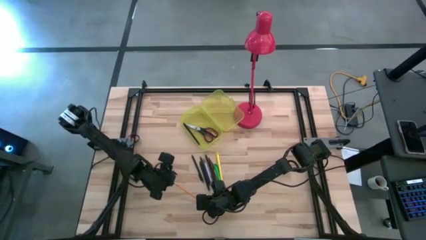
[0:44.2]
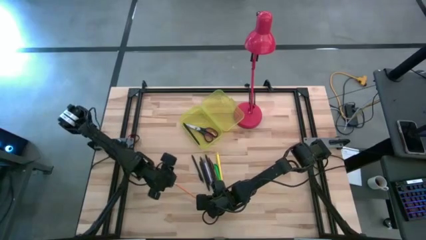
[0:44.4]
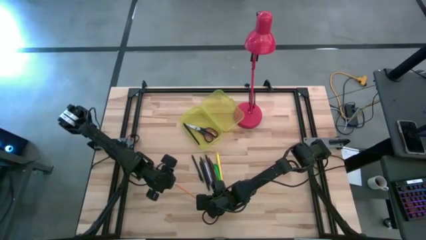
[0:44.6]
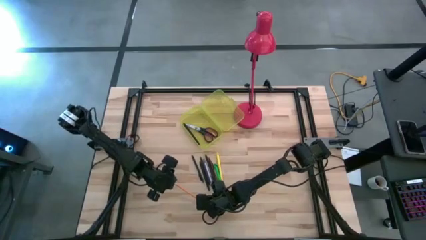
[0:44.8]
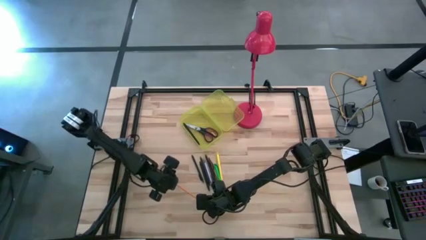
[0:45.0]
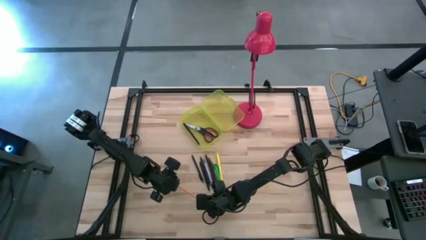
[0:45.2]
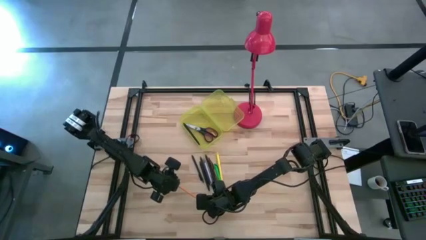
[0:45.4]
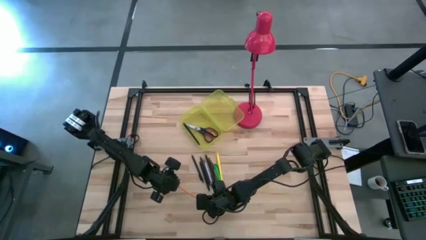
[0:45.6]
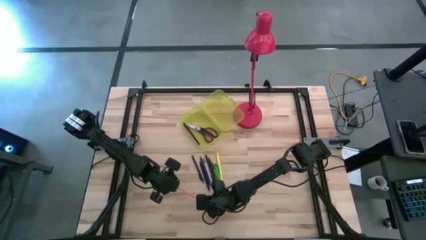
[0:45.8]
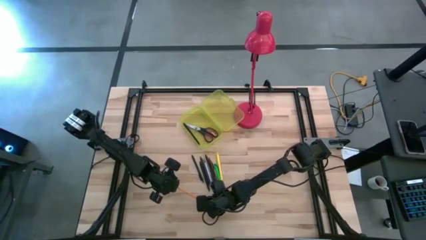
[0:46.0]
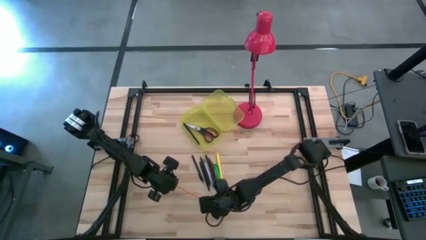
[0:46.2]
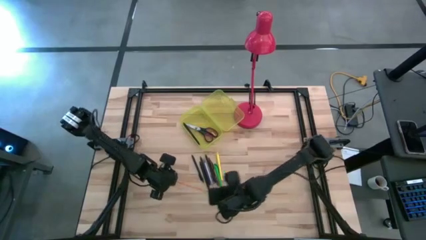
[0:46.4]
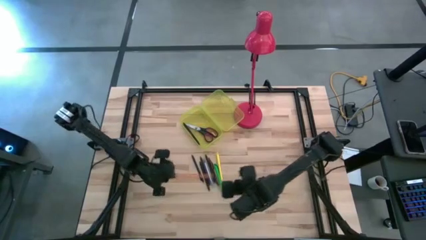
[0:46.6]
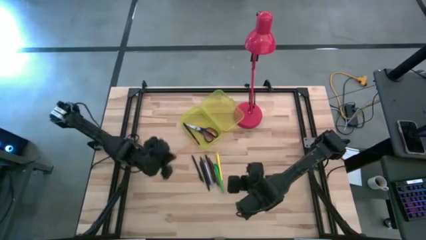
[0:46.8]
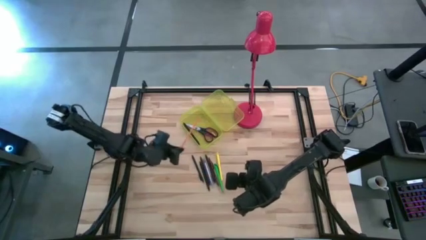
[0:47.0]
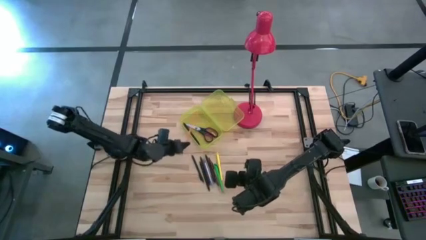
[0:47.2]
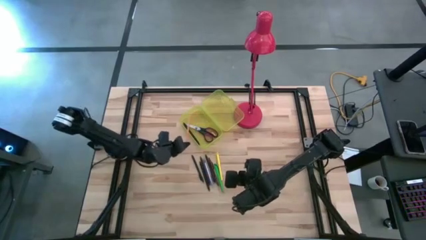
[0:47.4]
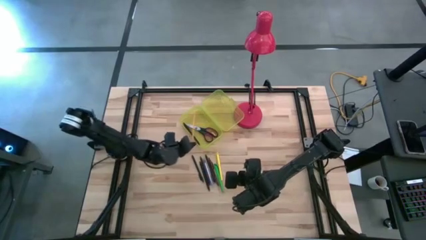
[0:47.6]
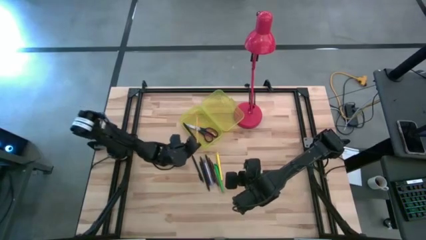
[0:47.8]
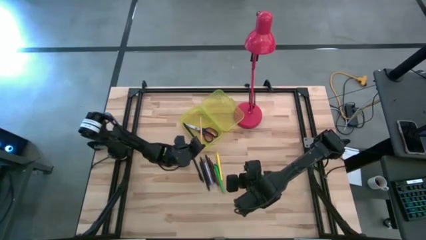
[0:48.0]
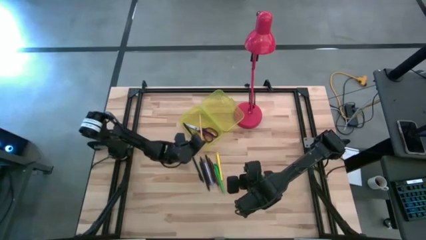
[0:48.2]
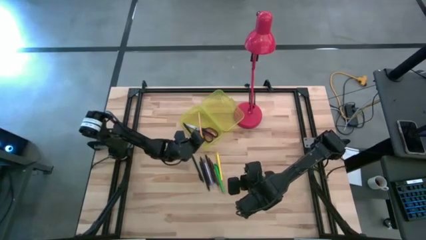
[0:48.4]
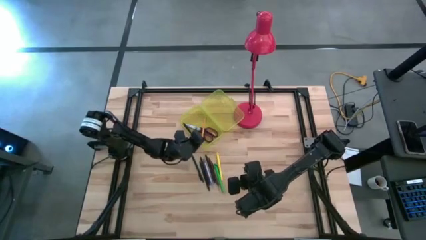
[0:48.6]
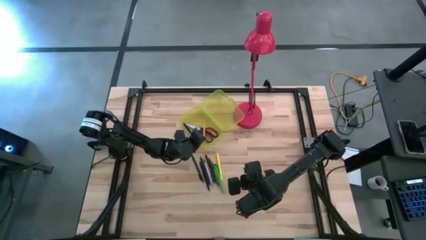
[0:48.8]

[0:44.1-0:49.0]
Task: Pick & place school supplies into a supply box
Put the orange pencil into the yellow supply box

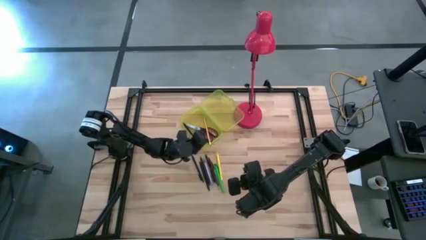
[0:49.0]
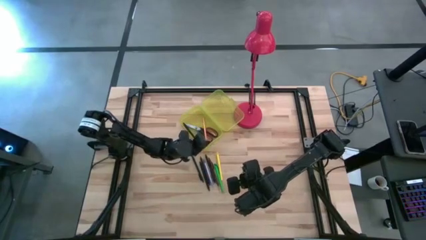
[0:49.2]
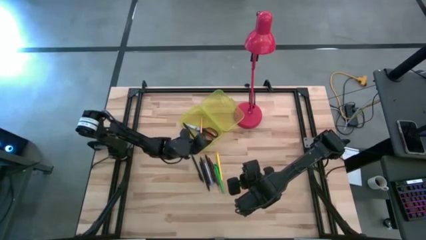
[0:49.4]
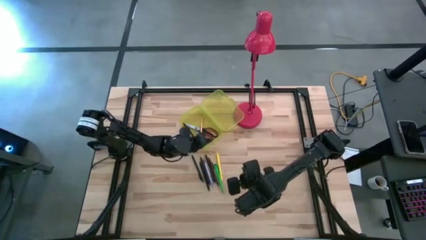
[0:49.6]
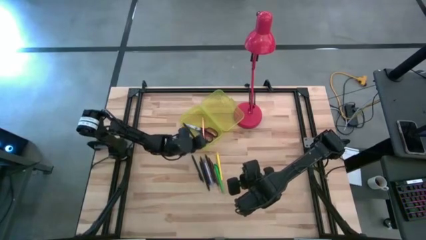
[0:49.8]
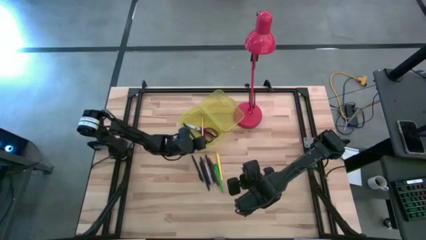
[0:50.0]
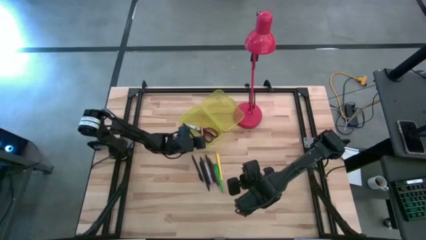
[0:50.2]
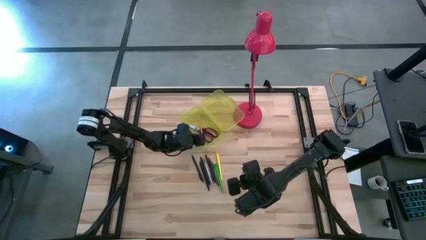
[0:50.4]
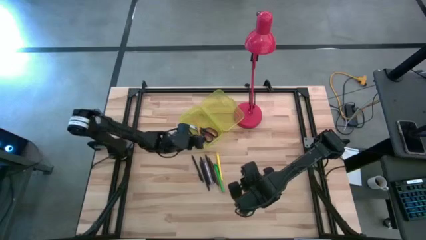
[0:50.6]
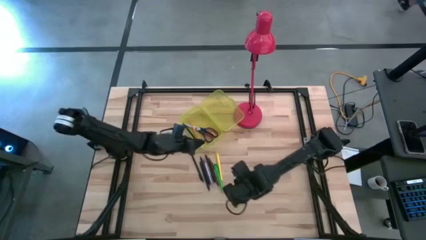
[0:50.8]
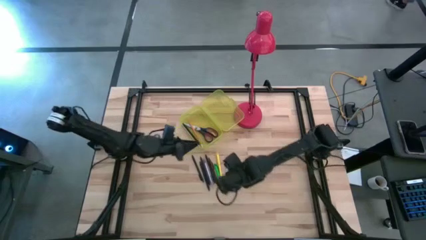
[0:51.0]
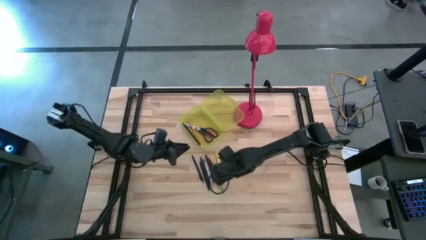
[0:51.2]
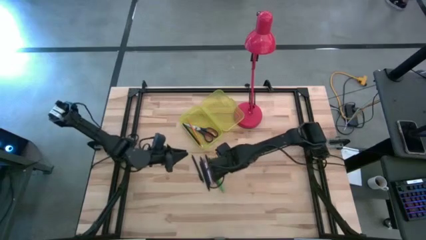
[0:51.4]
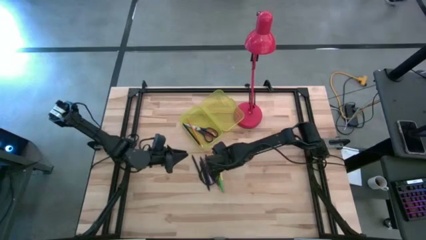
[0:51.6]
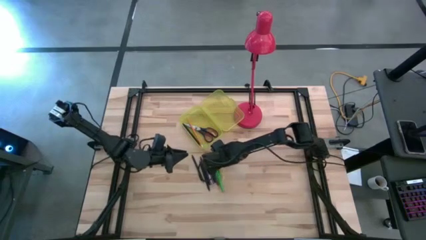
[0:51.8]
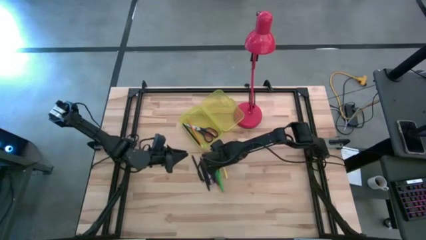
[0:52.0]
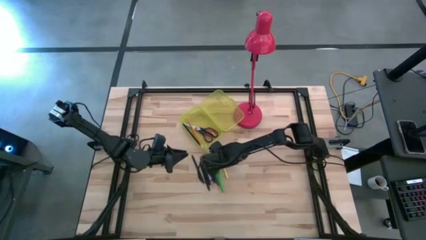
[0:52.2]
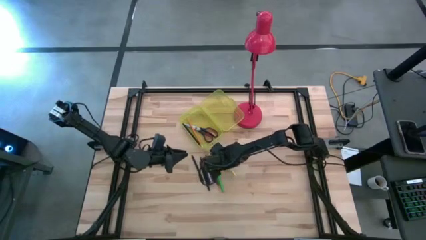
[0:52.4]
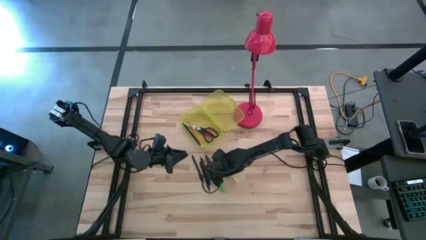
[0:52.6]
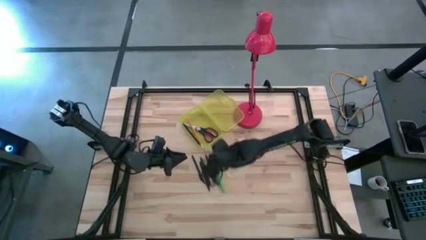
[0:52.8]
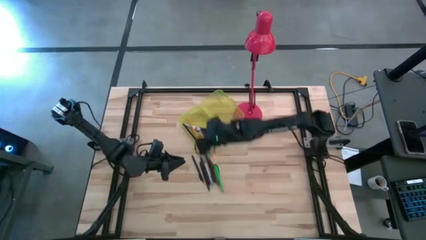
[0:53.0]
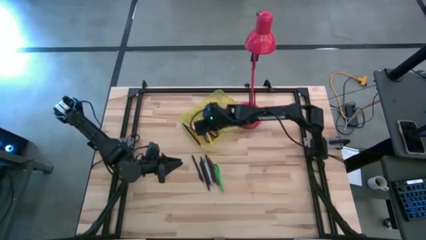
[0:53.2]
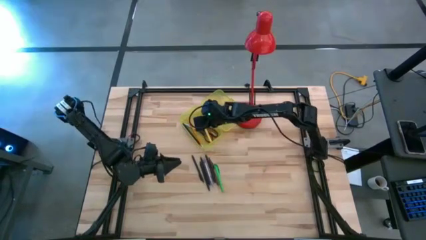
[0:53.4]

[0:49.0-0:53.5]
Put the yellow pen into the yellow supply box

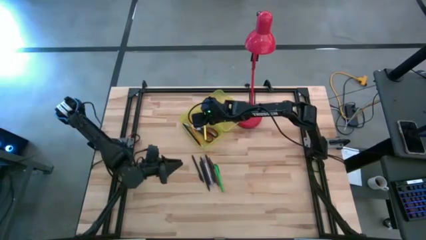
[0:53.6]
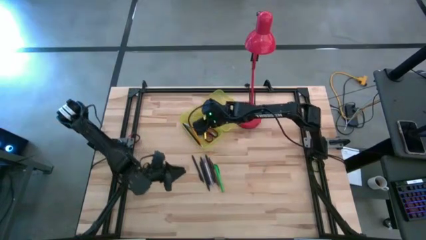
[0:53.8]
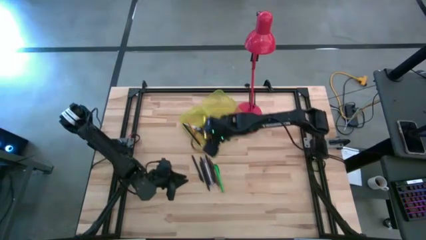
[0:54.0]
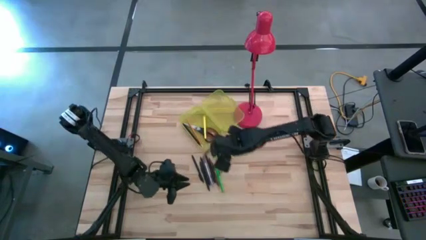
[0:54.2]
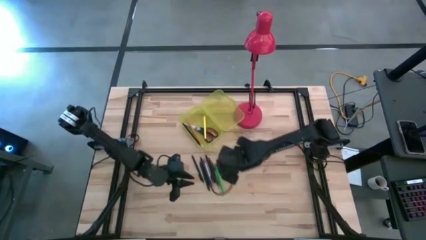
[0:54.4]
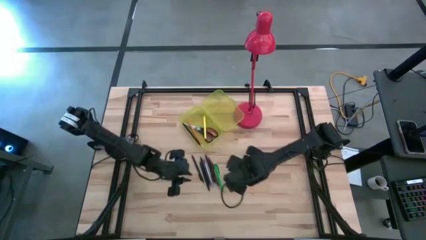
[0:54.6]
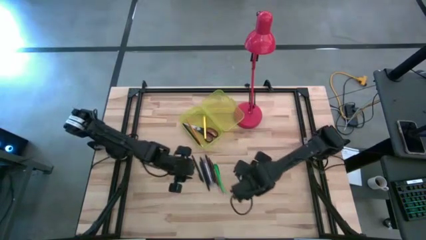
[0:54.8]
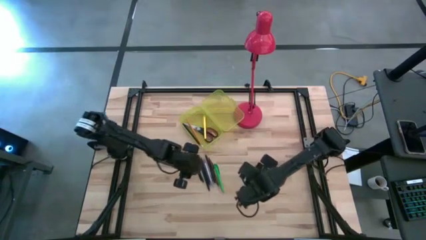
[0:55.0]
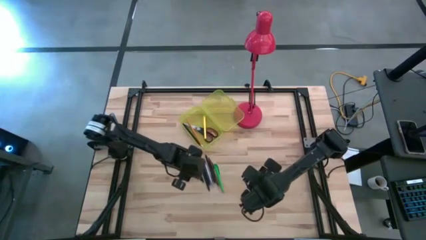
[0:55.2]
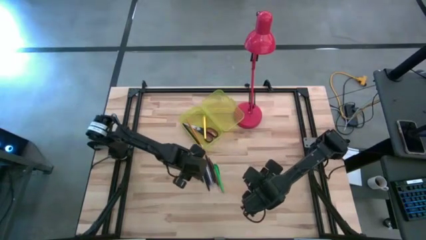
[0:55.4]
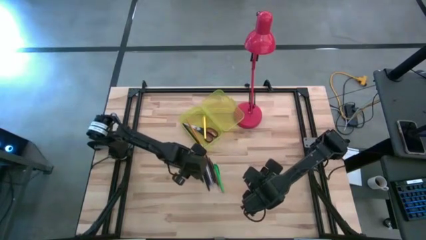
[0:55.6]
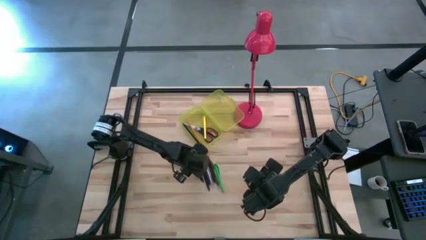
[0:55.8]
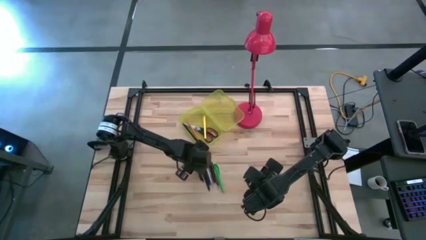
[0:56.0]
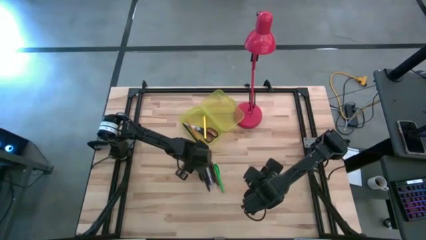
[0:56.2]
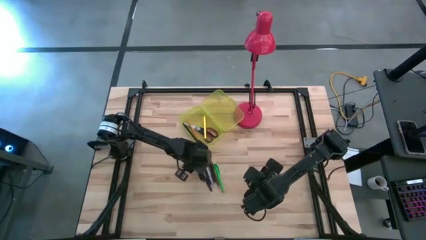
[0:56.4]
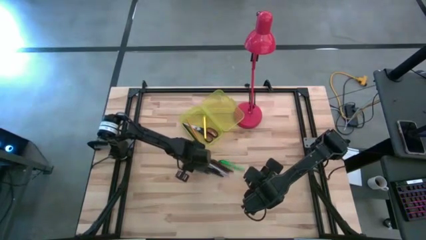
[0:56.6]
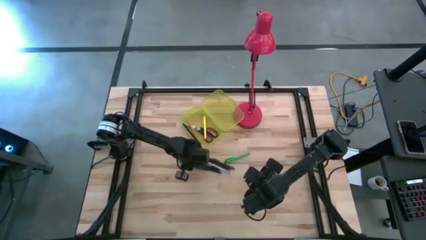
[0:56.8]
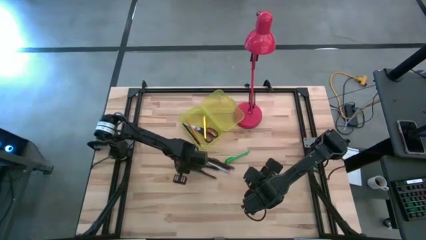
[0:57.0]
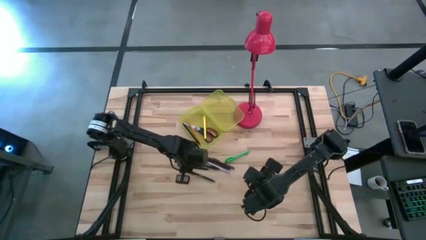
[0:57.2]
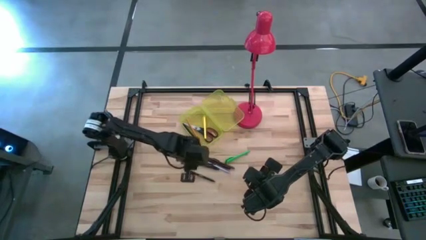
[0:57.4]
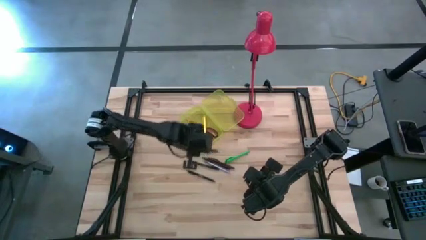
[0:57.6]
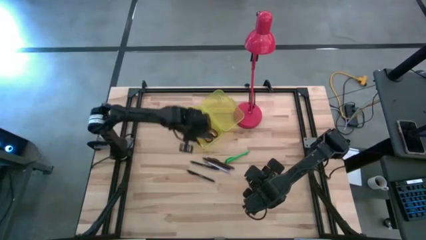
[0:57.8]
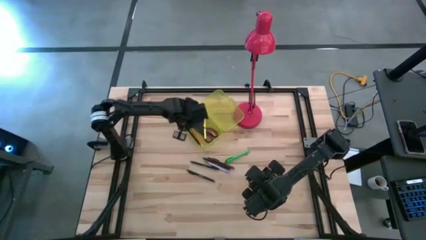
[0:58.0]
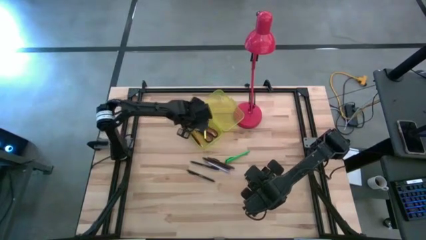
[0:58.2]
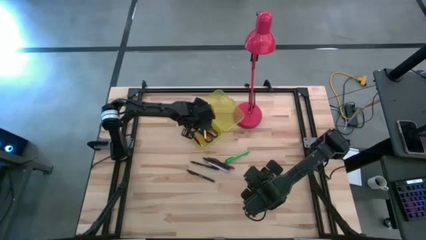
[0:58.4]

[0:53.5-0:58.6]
Put the black pen into the yellow supply box

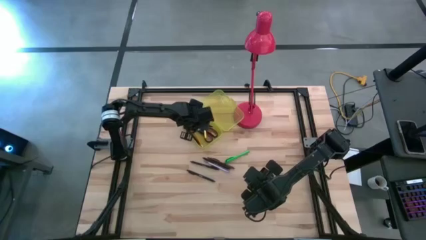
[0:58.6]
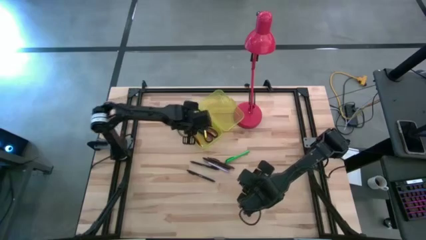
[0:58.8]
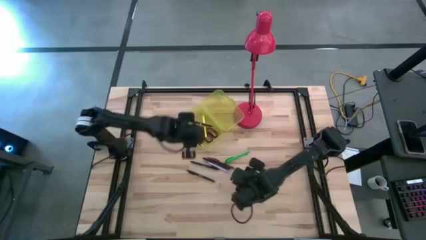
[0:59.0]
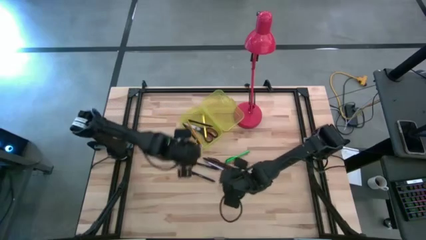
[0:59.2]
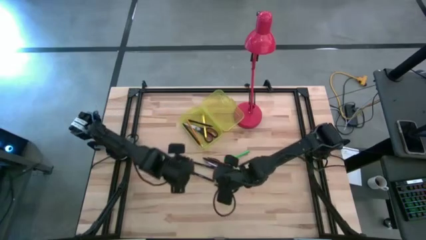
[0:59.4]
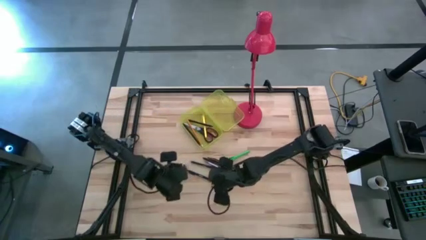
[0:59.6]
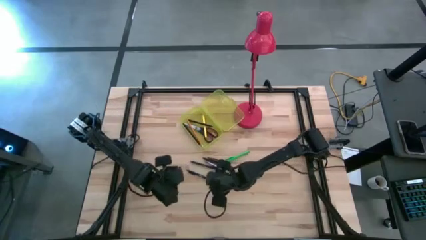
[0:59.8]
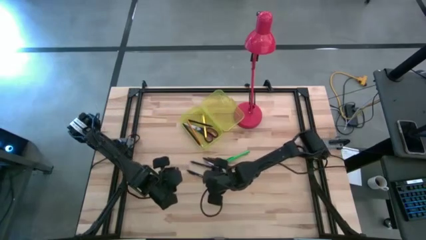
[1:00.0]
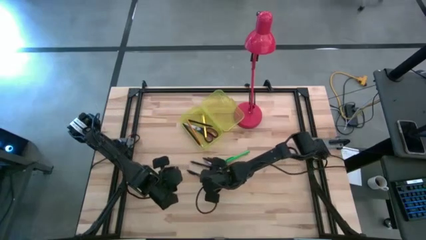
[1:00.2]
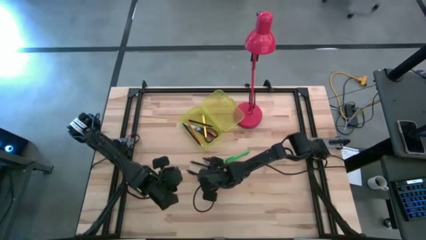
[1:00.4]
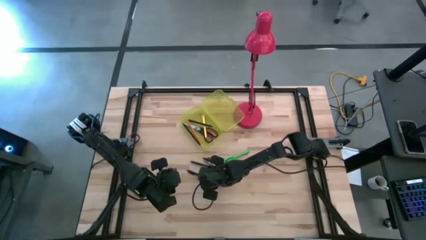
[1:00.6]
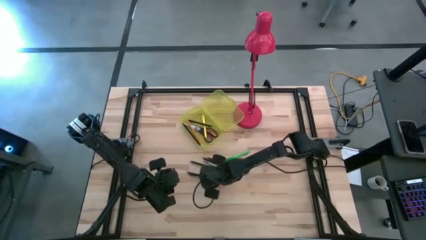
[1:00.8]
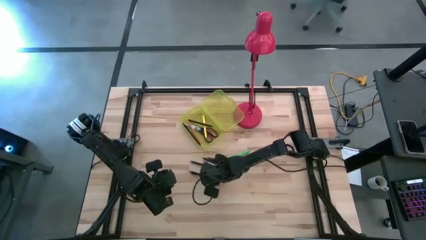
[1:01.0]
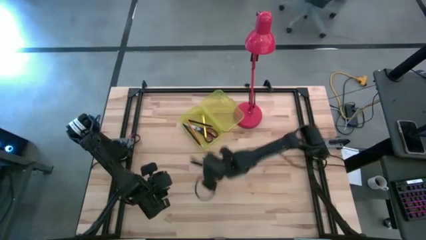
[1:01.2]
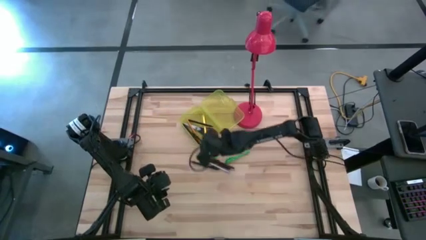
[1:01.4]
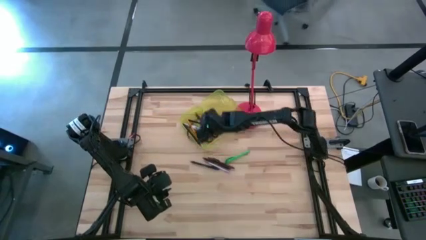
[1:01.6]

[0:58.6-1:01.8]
Put the black pen into the yellow supply box
